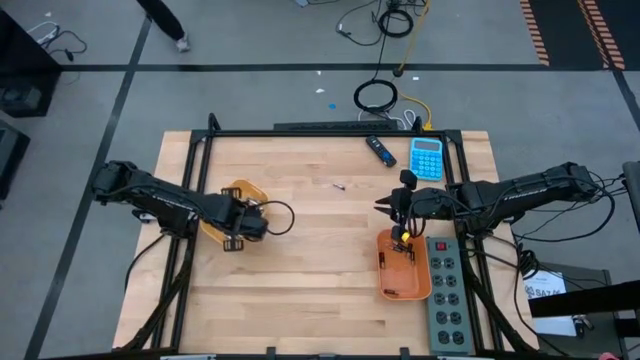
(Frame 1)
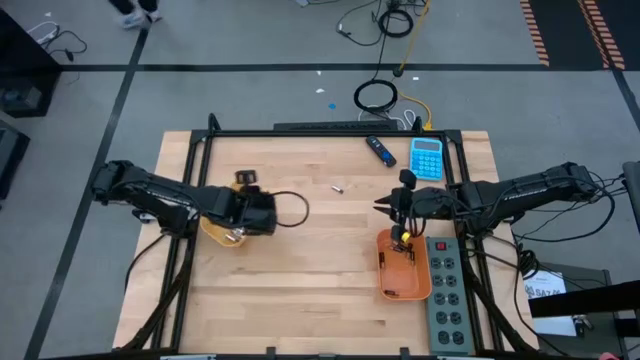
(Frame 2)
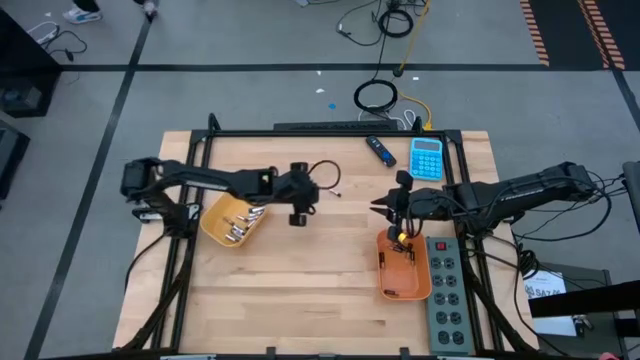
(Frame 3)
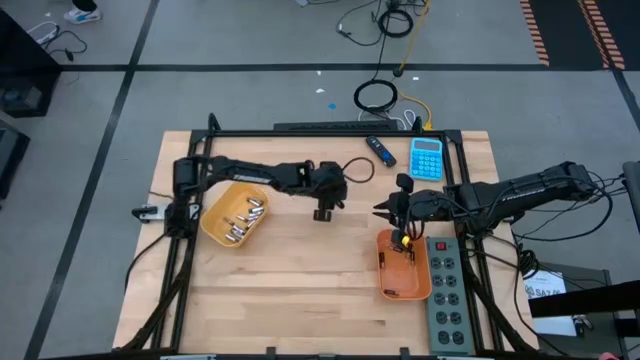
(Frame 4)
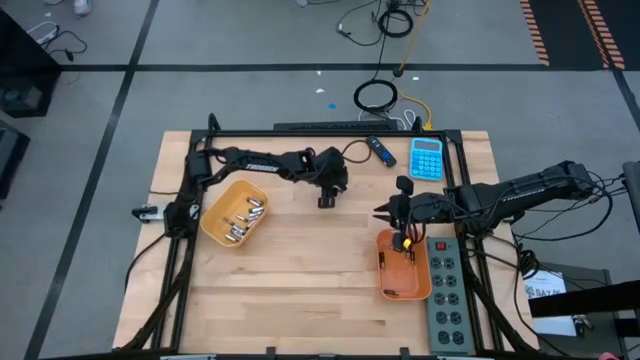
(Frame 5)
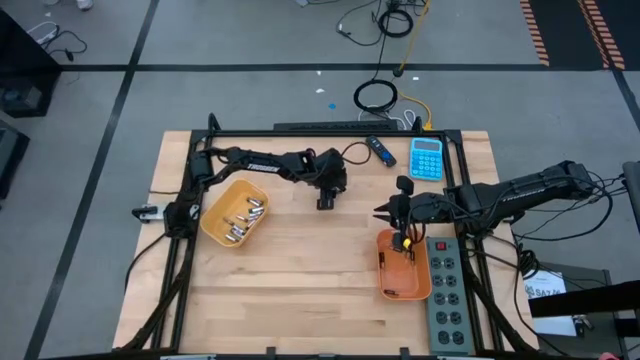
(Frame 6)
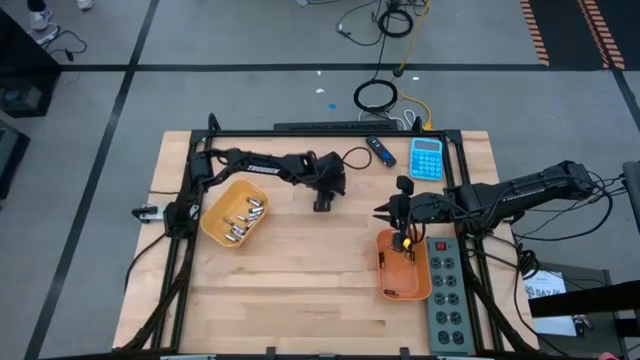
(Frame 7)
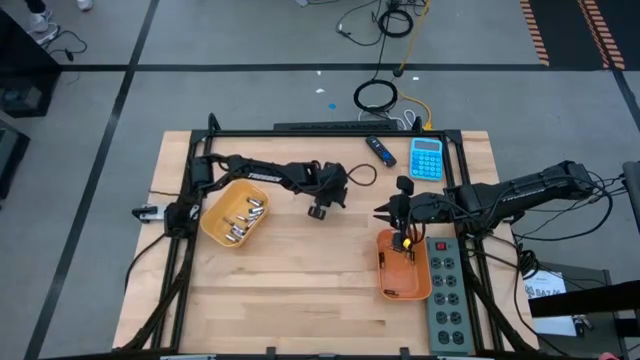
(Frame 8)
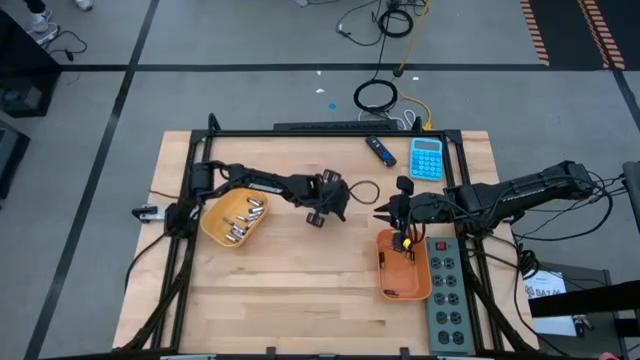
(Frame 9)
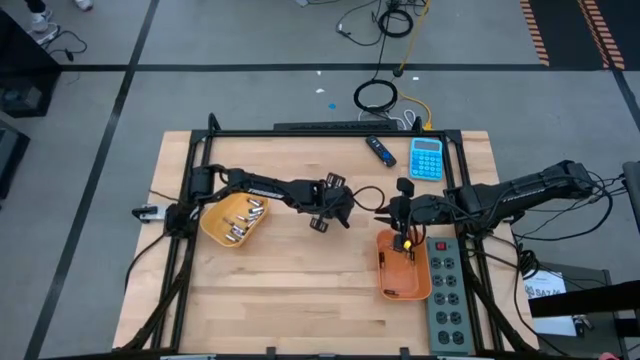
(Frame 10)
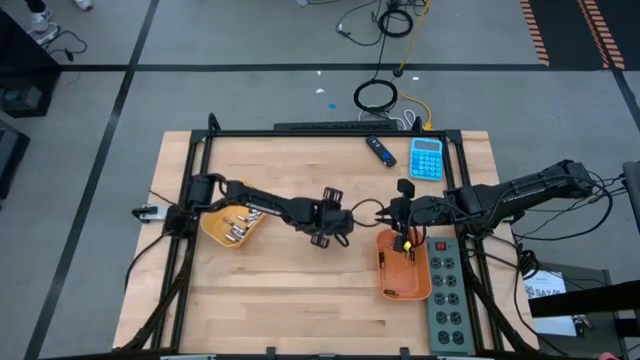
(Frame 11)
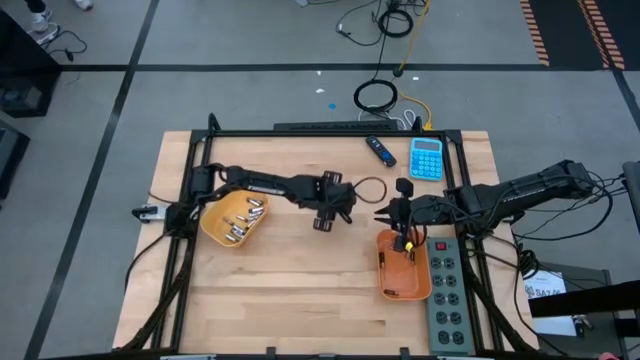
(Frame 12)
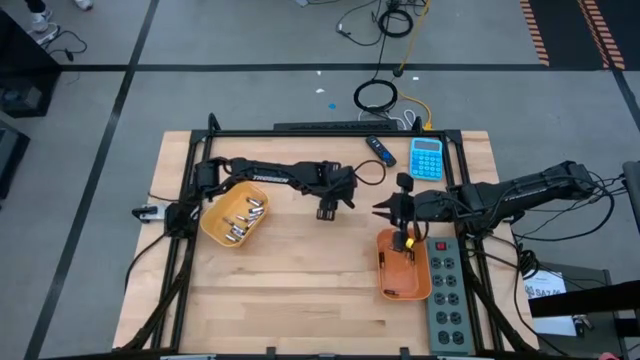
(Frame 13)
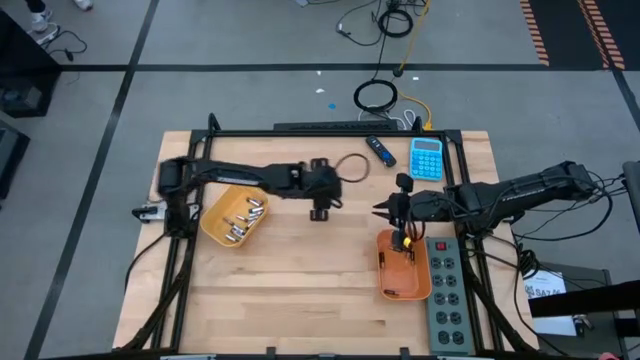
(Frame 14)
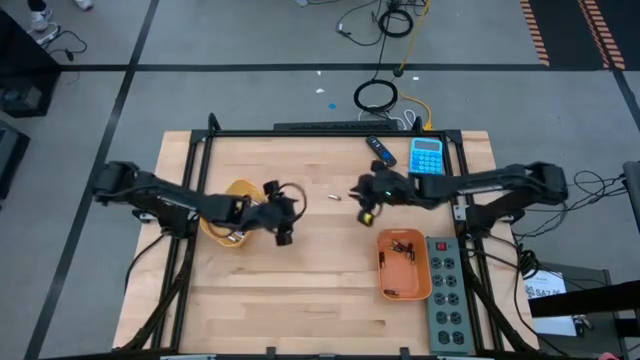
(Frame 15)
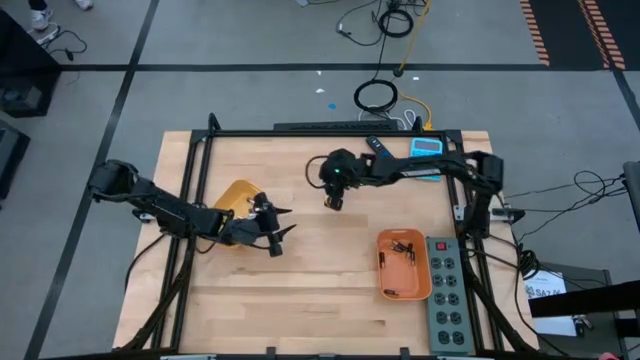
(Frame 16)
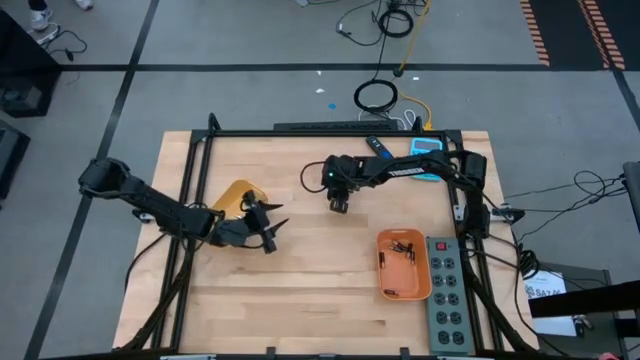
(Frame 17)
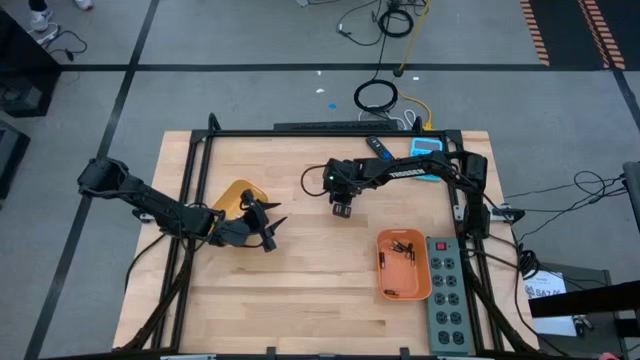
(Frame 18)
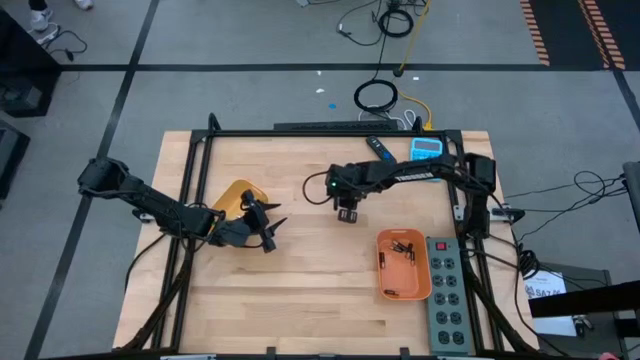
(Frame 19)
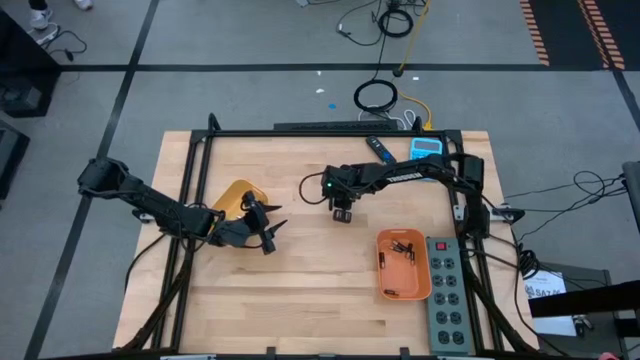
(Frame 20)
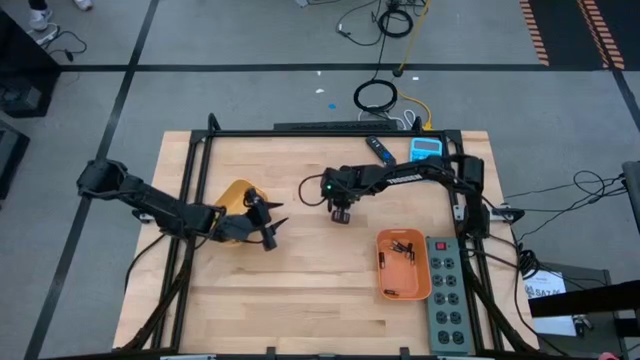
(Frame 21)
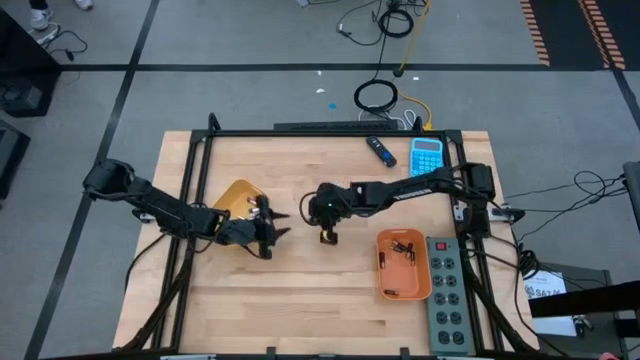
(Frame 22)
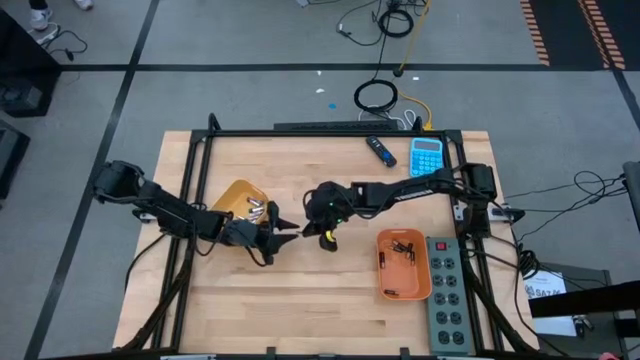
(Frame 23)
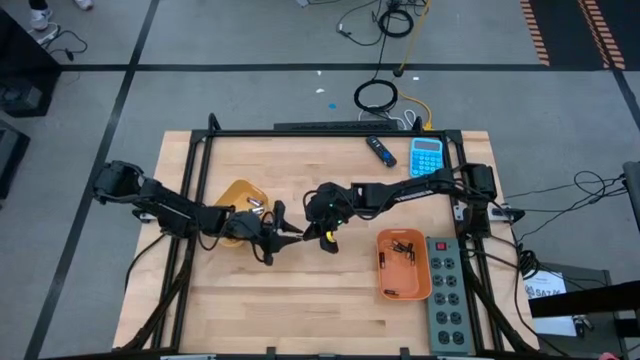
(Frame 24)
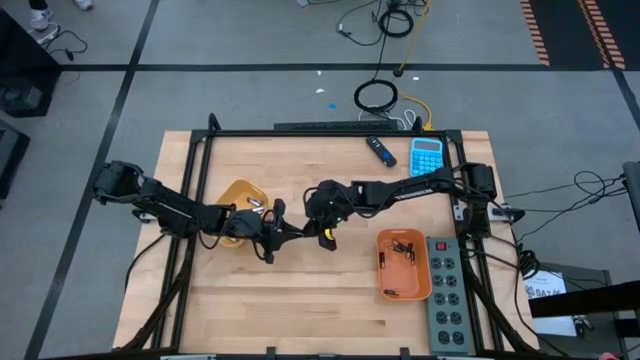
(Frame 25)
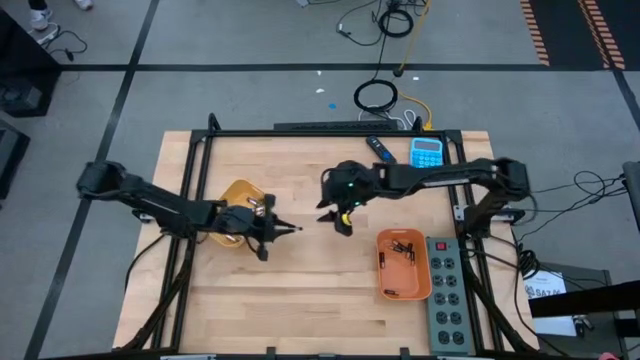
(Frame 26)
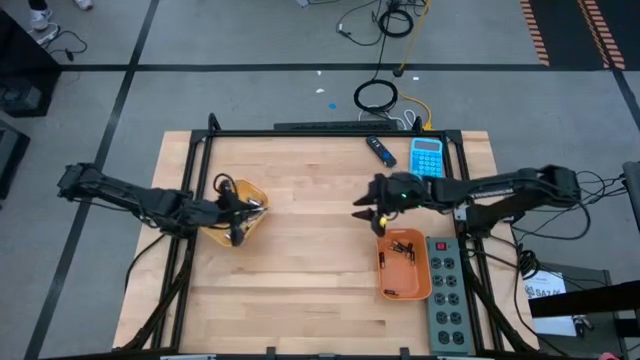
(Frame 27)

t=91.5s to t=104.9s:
Task: Sort batteries
Put the white battery into the yellow bin

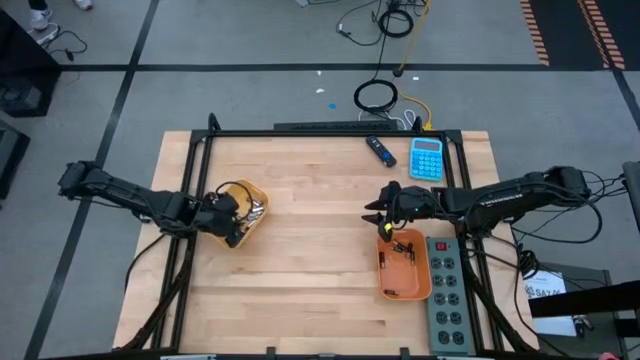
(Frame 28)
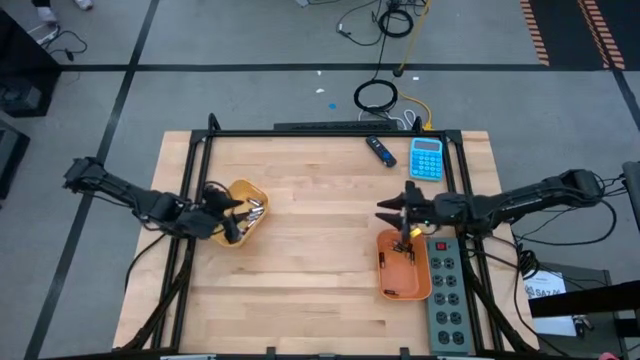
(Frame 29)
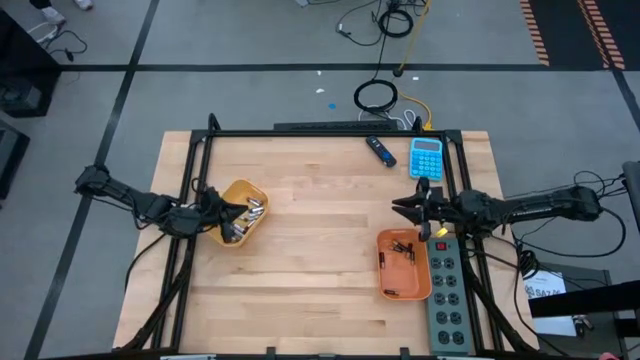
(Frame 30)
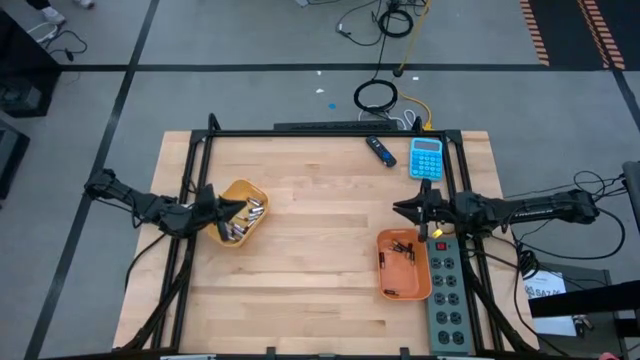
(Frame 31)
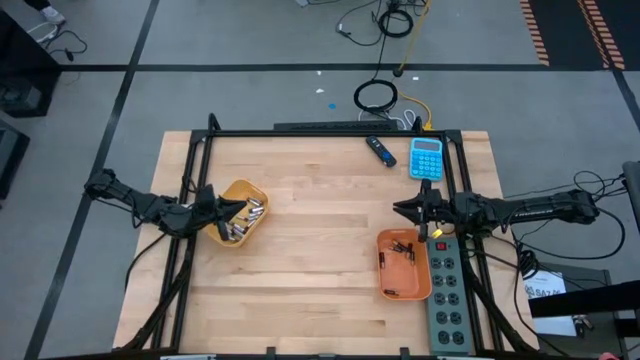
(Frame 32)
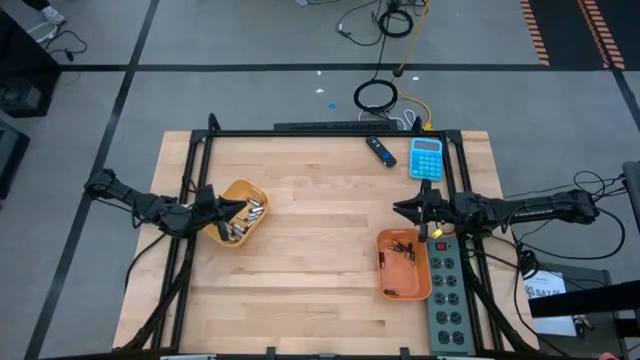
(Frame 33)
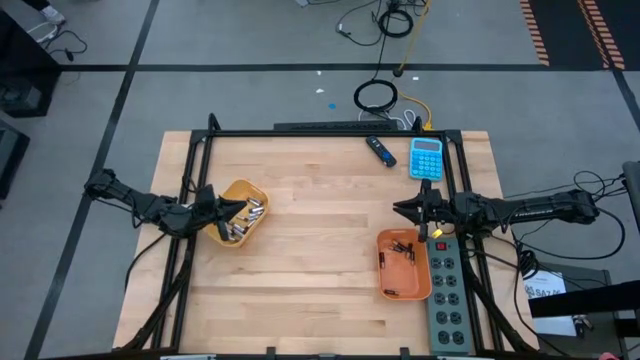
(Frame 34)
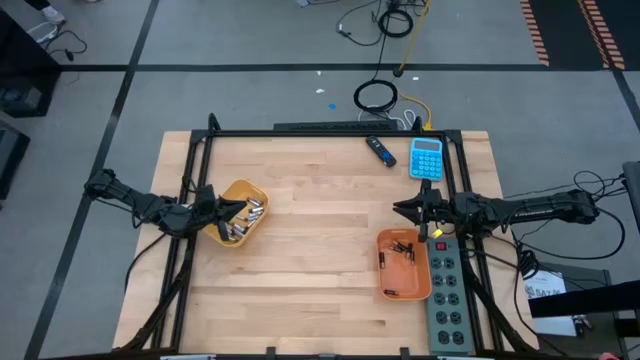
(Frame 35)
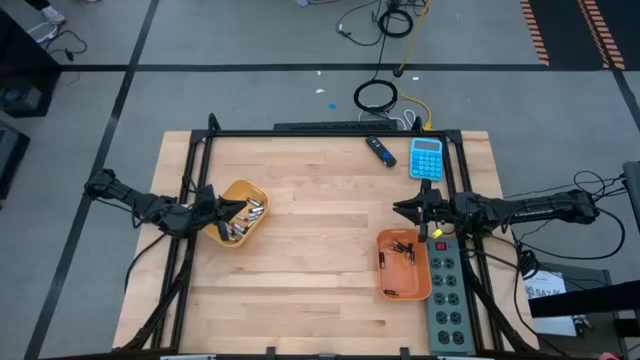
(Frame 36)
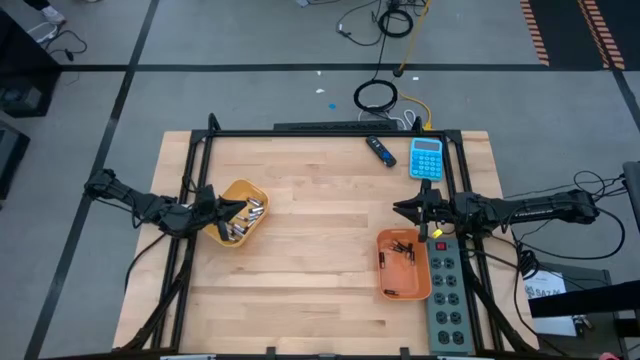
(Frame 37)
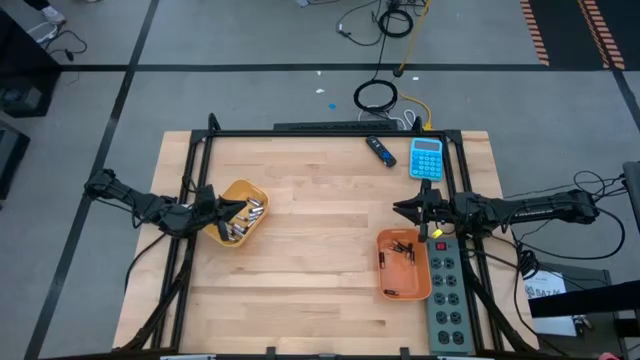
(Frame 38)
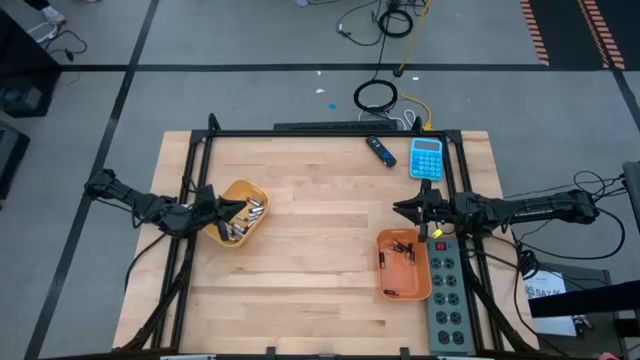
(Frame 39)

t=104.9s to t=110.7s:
Return to Home Position

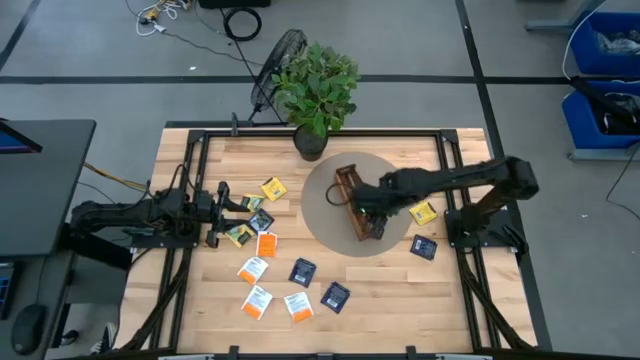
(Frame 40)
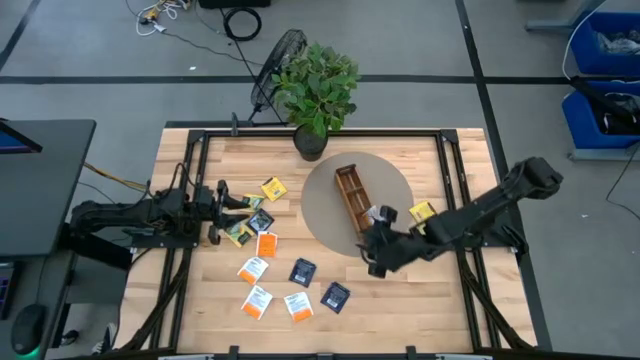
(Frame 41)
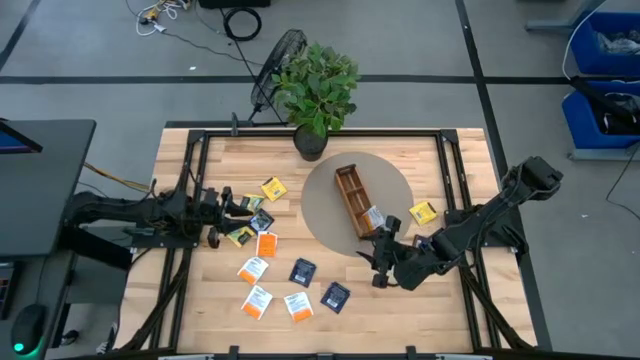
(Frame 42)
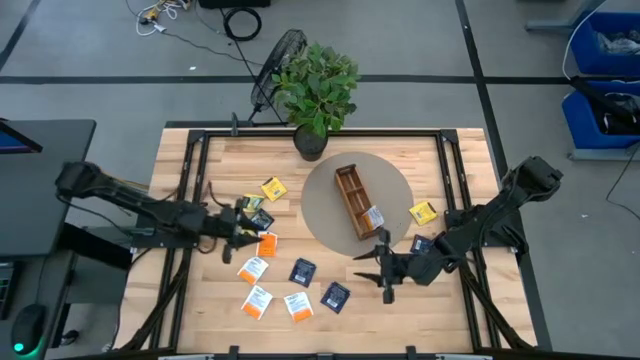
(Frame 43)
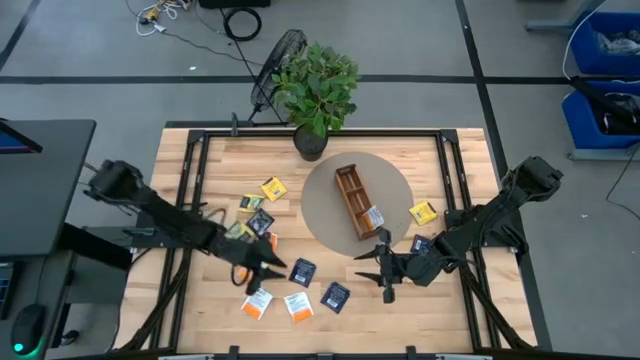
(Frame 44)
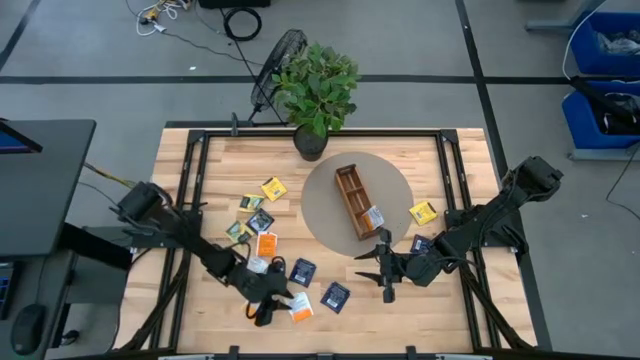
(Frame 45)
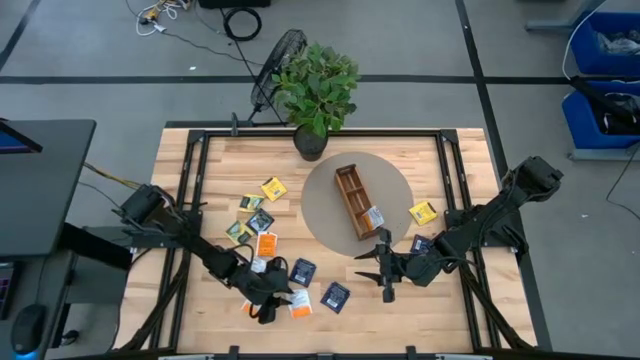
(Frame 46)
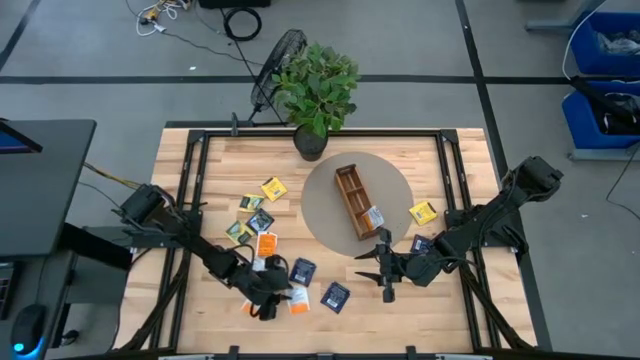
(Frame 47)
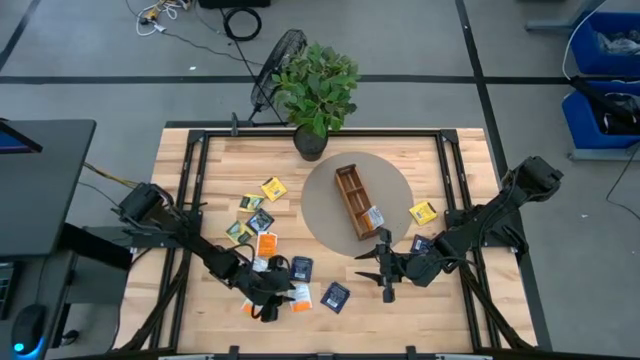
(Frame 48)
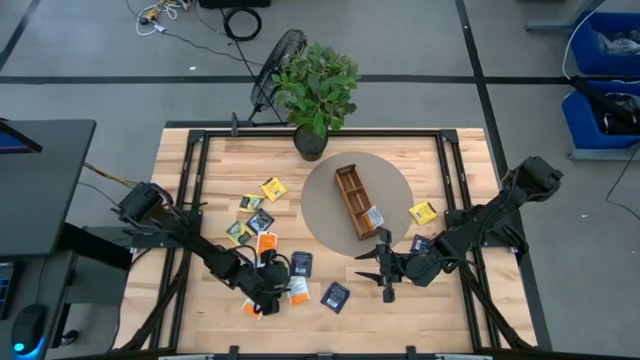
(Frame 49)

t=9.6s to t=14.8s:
Task: Pick & Place Tea
Put the white tea bag into the bottom section of the wooden organizer
